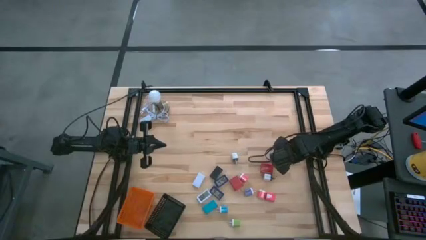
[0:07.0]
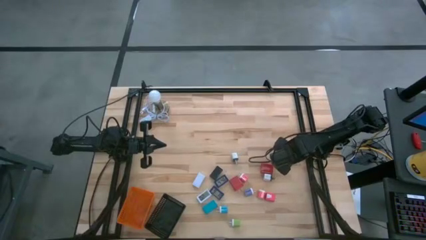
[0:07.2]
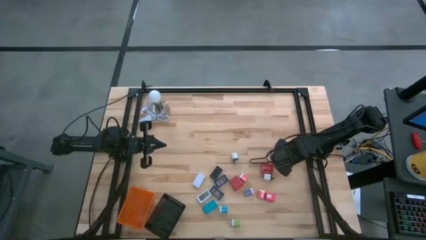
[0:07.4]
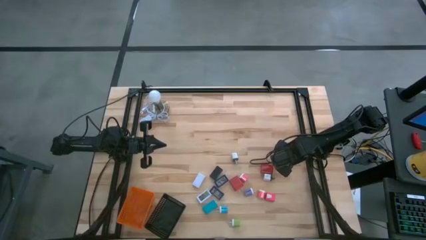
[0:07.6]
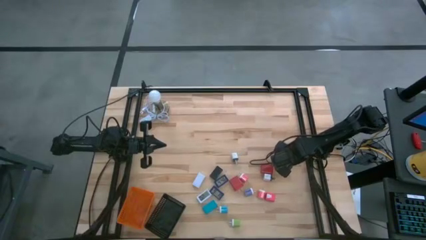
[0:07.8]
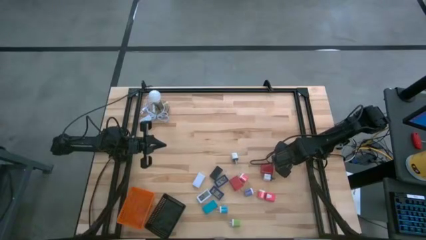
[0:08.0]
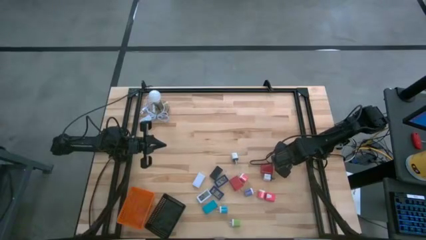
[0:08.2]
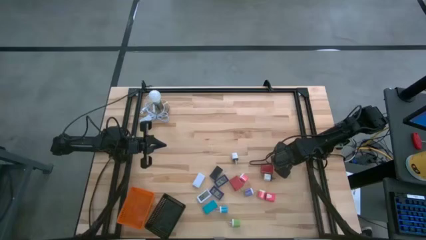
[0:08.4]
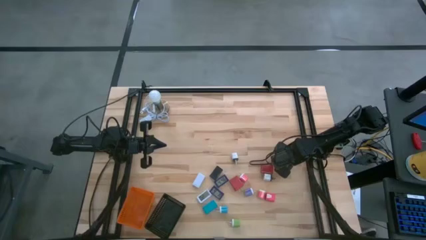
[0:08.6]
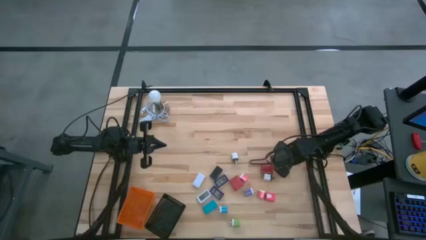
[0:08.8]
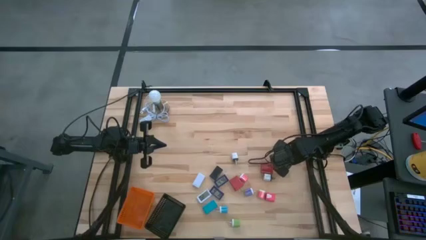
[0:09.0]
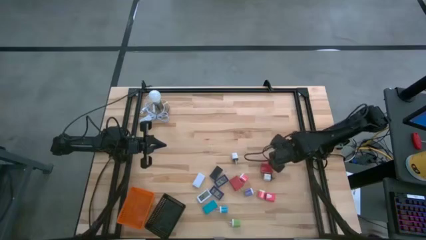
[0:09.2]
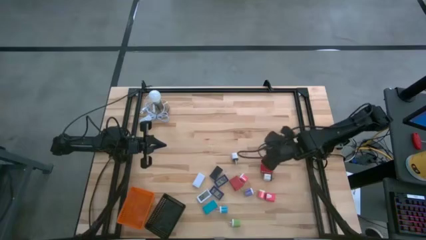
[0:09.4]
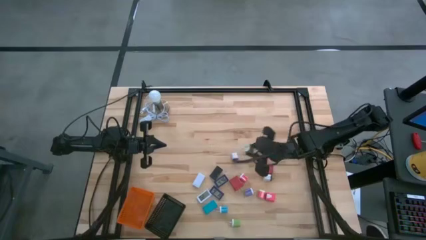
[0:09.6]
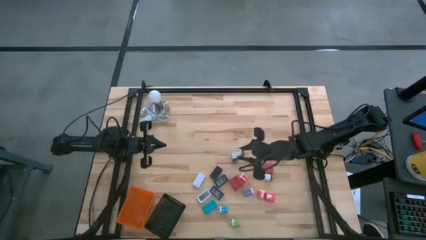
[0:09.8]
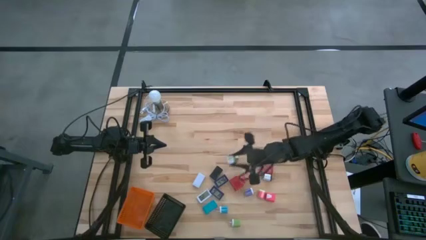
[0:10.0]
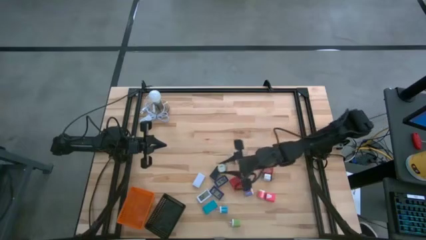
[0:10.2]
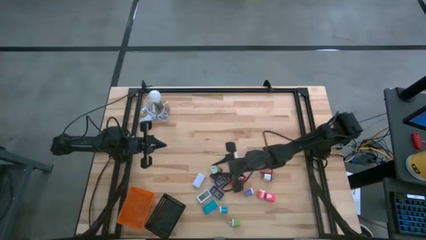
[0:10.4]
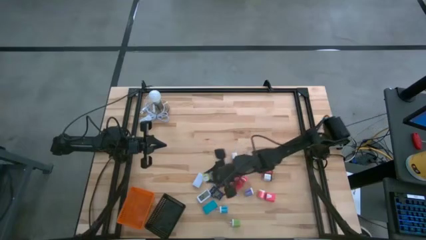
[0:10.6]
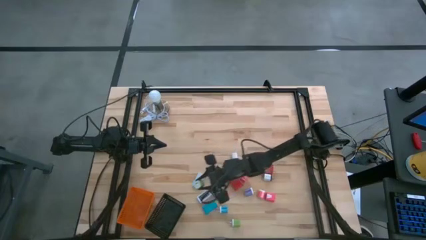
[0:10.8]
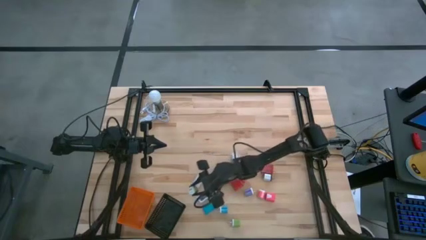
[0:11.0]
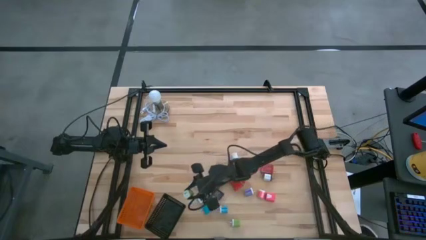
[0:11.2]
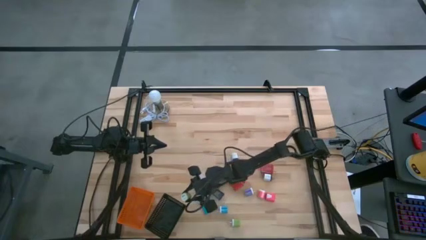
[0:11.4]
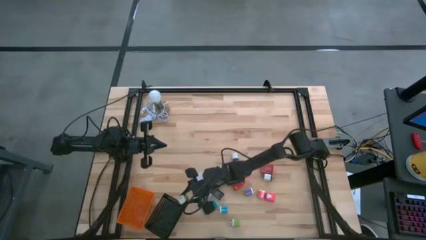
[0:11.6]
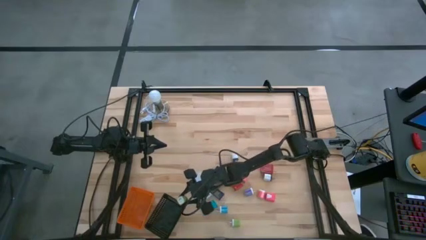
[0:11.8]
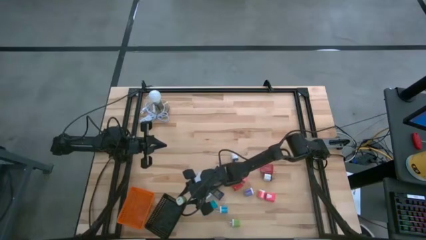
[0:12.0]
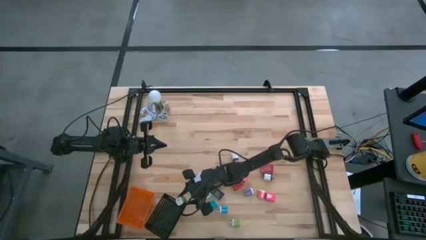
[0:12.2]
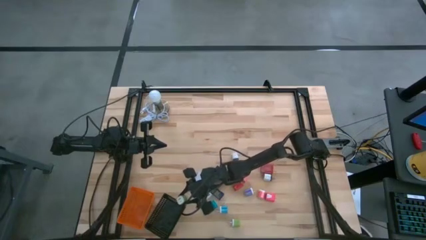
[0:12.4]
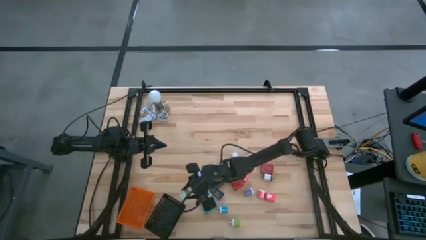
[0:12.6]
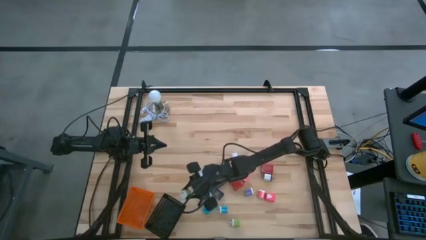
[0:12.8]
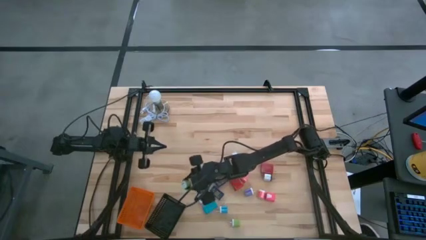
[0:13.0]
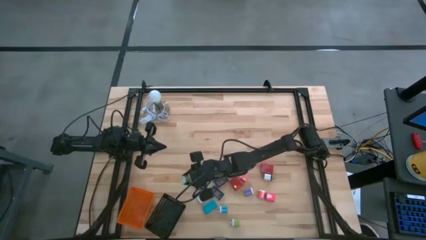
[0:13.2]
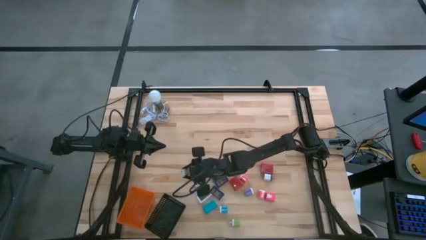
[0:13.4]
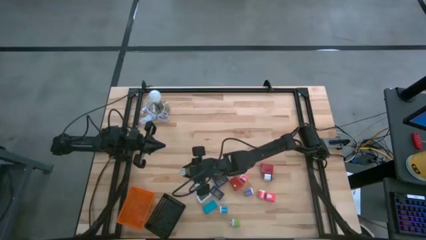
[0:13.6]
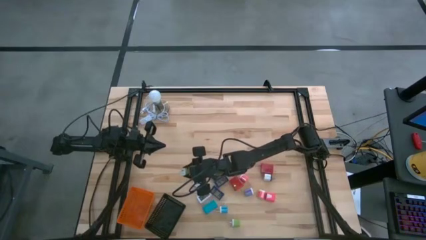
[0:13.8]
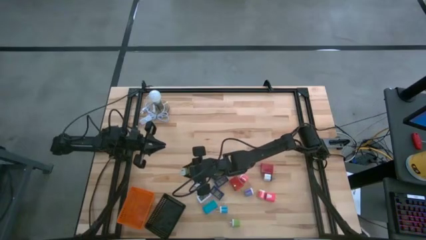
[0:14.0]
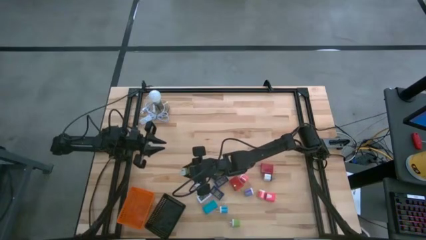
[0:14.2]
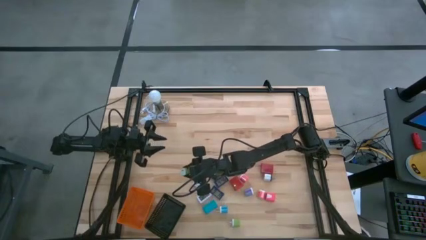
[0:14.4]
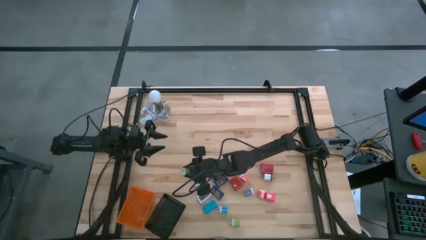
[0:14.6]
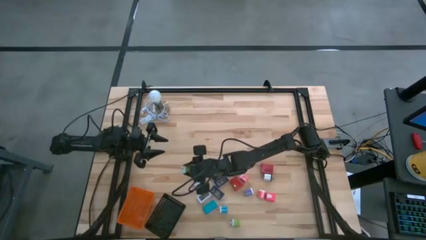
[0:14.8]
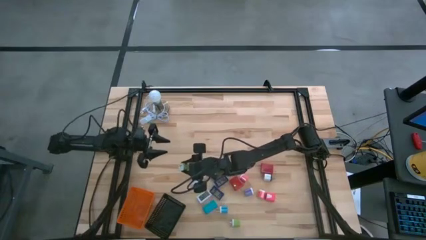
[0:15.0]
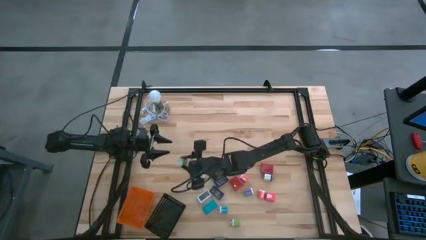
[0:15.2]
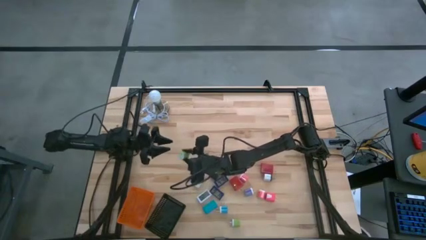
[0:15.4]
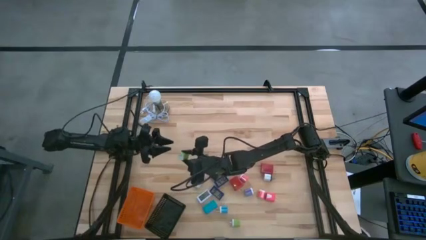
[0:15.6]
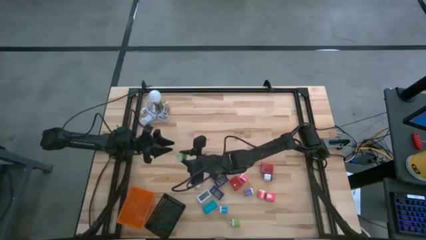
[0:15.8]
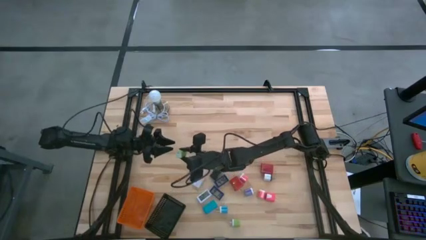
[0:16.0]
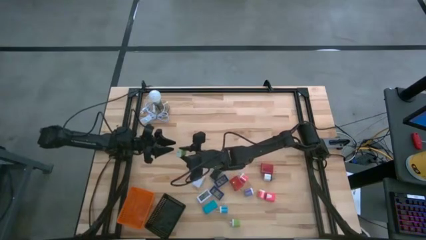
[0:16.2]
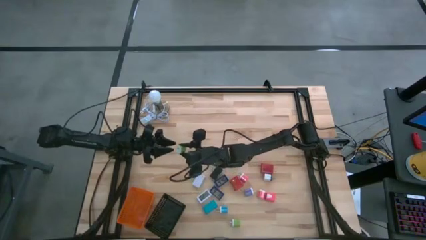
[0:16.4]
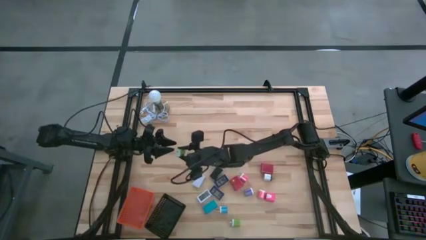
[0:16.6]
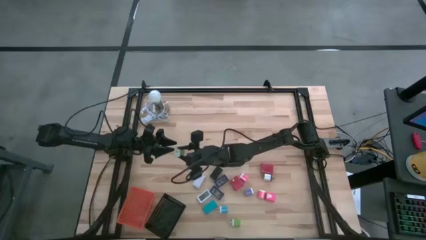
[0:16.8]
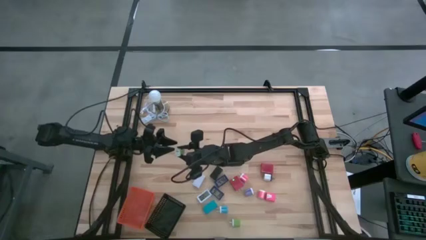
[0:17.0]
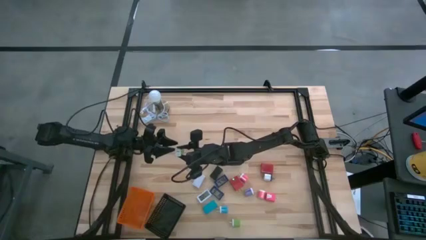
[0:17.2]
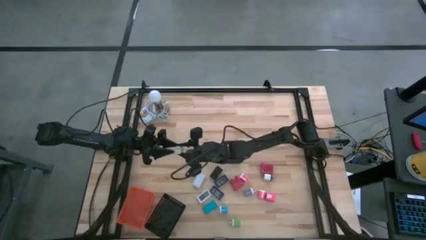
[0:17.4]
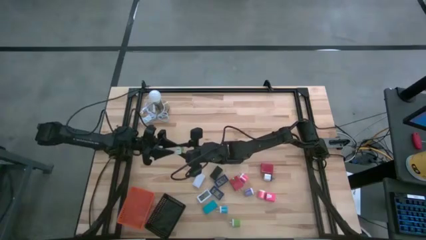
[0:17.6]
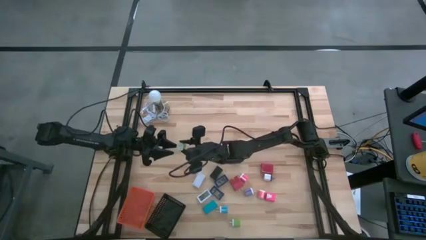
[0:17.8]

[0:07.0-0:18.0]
Task: Pick & Place Office items
Put the top green charger adapter into the black basket
